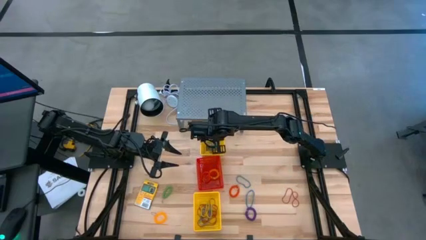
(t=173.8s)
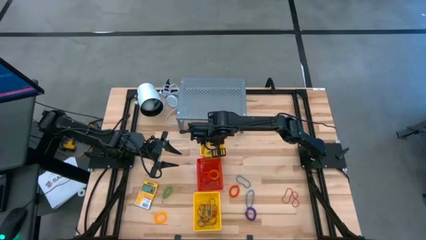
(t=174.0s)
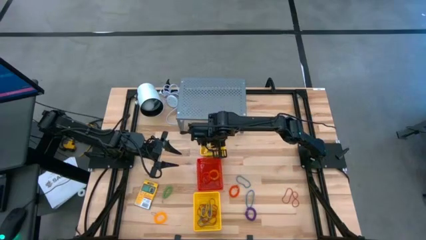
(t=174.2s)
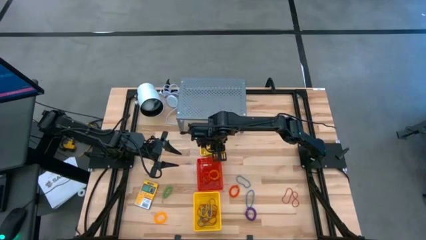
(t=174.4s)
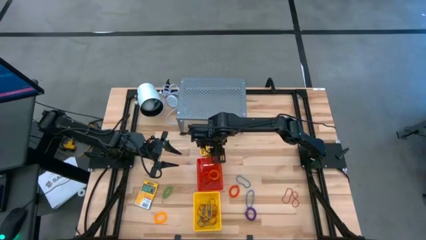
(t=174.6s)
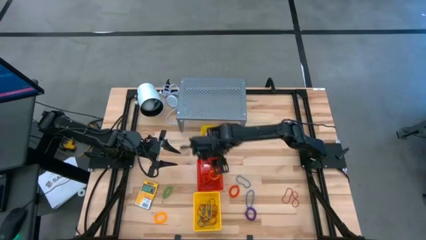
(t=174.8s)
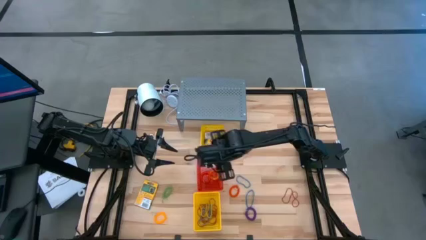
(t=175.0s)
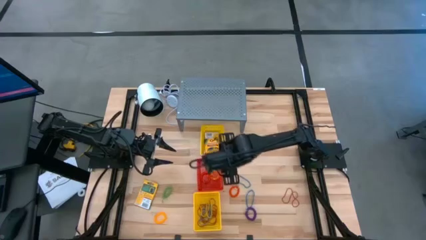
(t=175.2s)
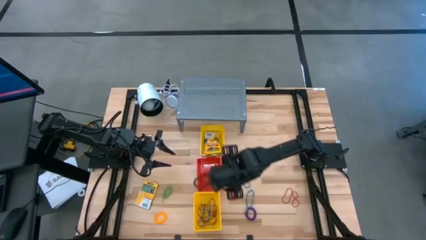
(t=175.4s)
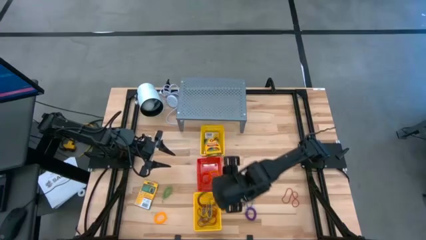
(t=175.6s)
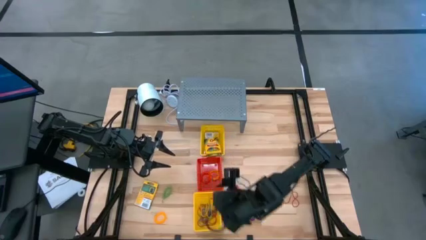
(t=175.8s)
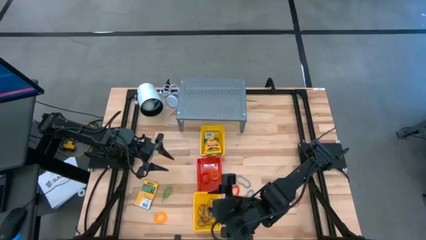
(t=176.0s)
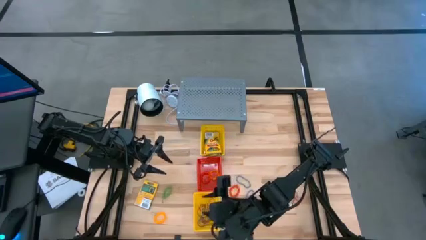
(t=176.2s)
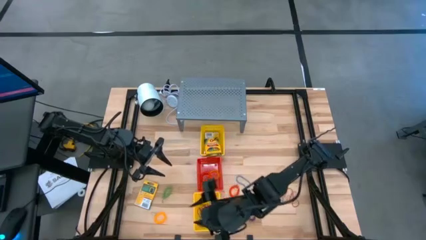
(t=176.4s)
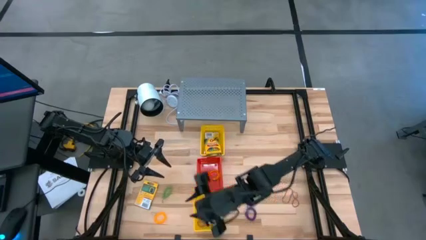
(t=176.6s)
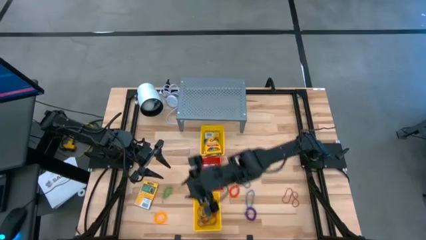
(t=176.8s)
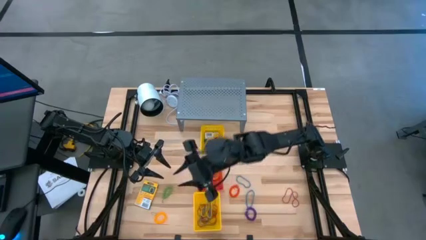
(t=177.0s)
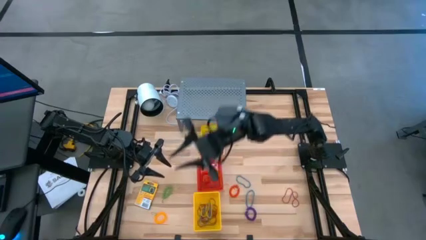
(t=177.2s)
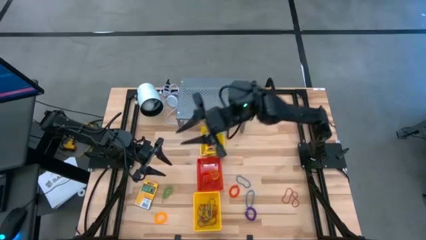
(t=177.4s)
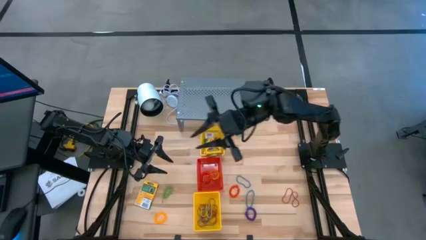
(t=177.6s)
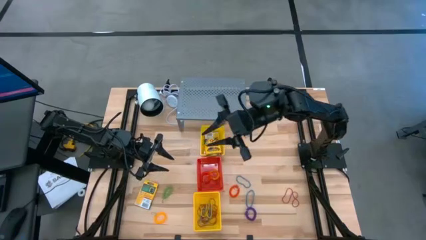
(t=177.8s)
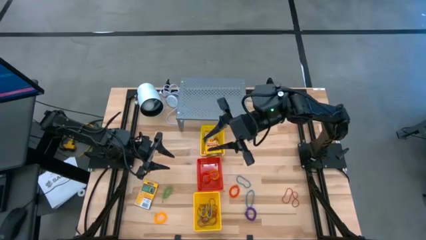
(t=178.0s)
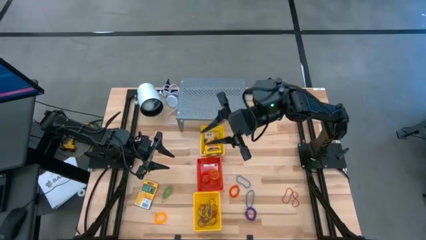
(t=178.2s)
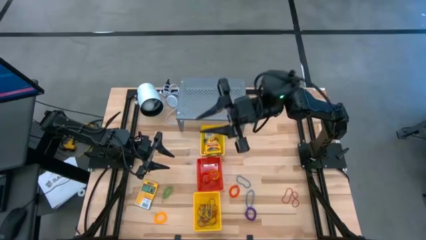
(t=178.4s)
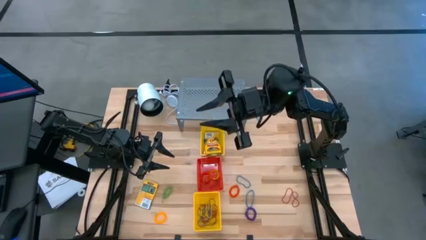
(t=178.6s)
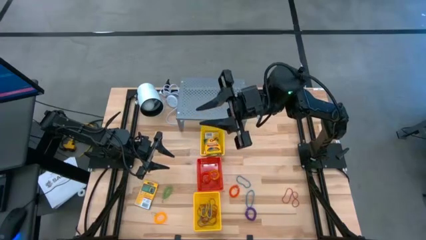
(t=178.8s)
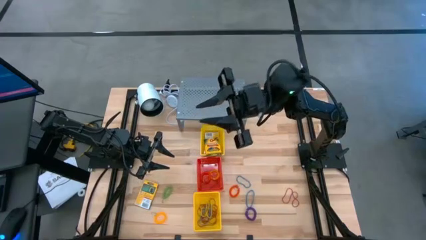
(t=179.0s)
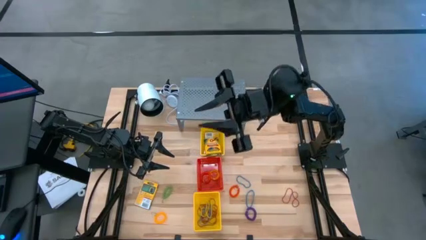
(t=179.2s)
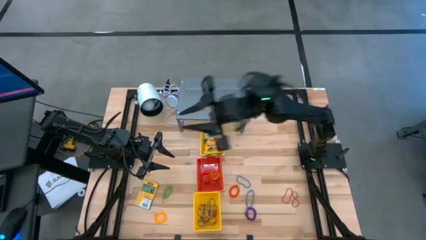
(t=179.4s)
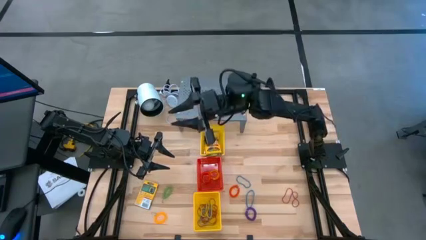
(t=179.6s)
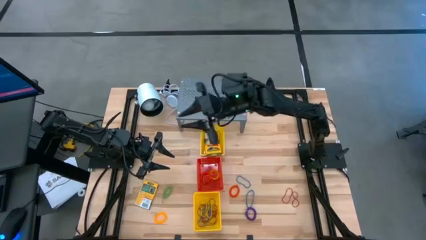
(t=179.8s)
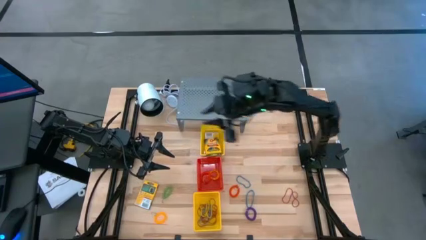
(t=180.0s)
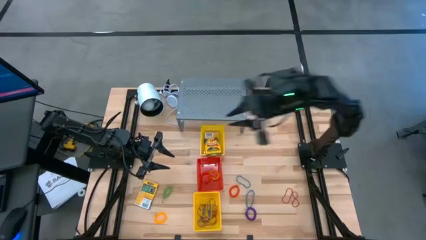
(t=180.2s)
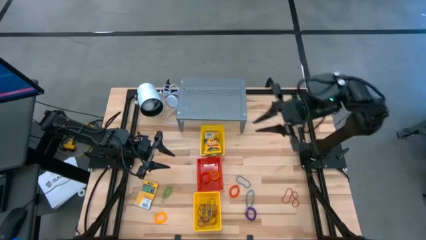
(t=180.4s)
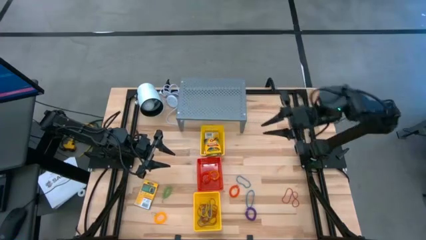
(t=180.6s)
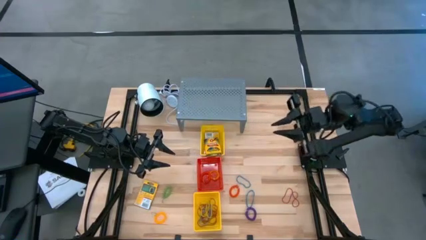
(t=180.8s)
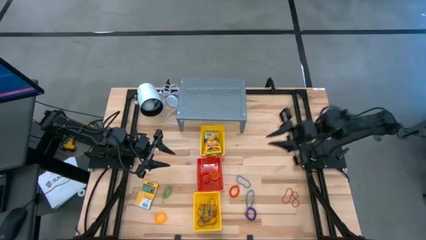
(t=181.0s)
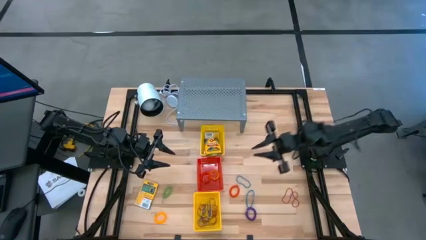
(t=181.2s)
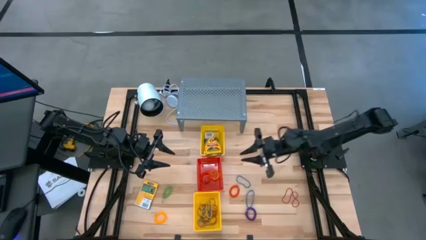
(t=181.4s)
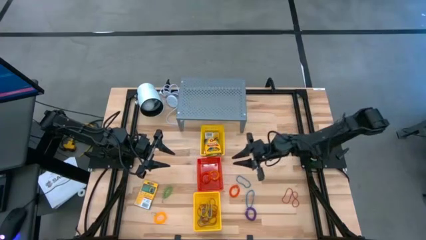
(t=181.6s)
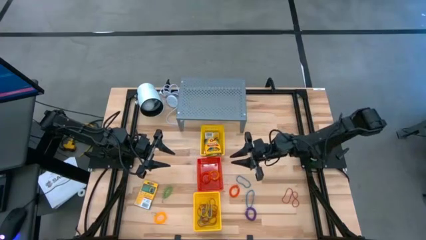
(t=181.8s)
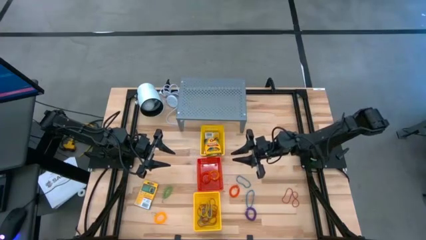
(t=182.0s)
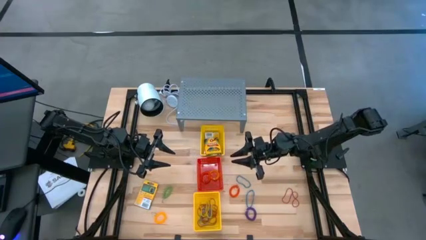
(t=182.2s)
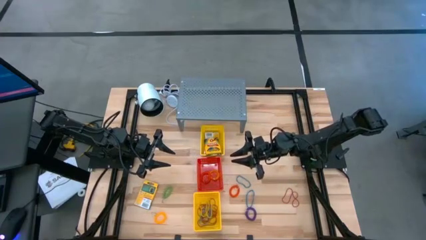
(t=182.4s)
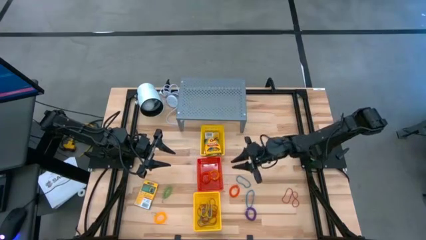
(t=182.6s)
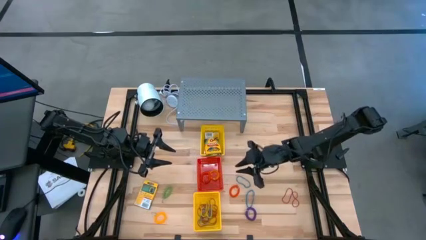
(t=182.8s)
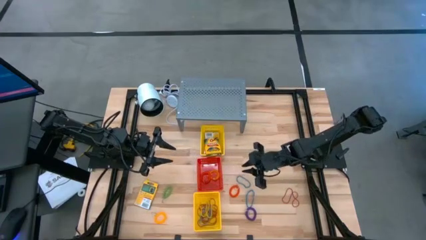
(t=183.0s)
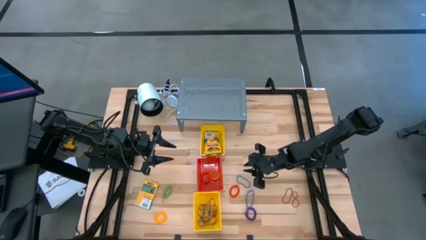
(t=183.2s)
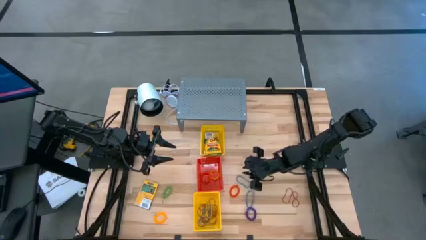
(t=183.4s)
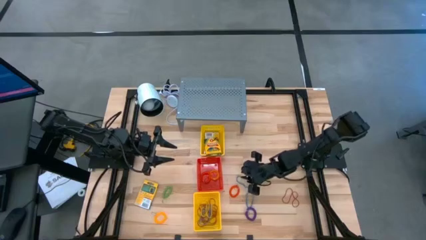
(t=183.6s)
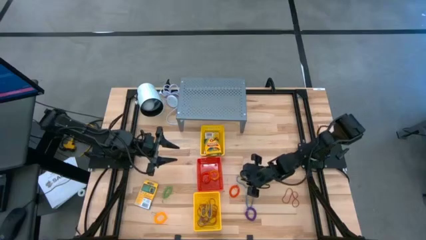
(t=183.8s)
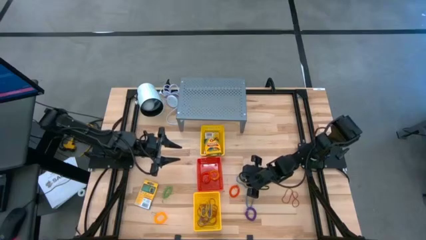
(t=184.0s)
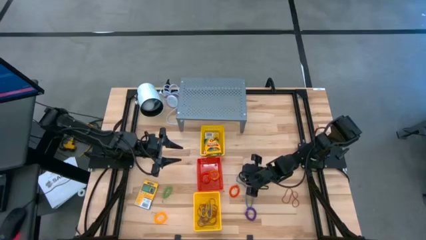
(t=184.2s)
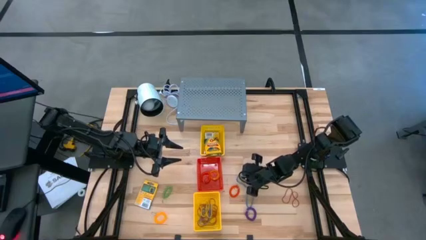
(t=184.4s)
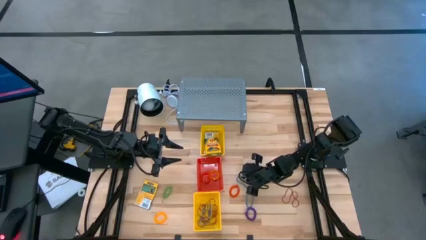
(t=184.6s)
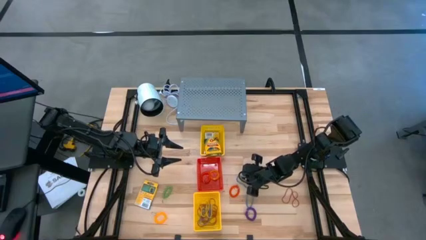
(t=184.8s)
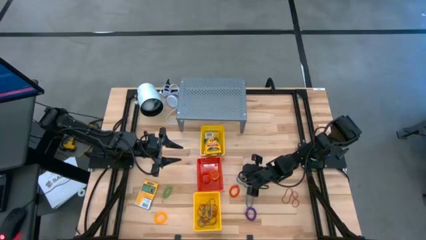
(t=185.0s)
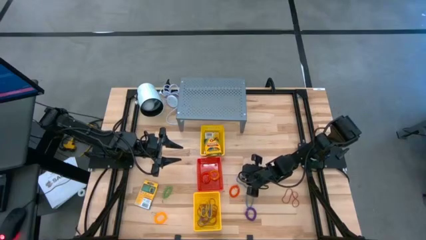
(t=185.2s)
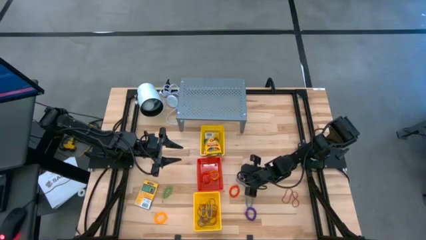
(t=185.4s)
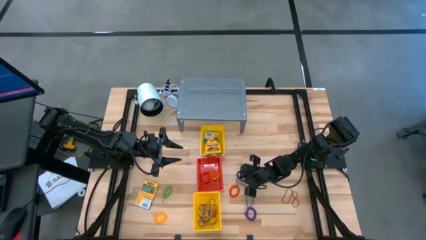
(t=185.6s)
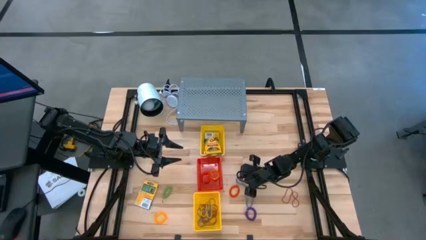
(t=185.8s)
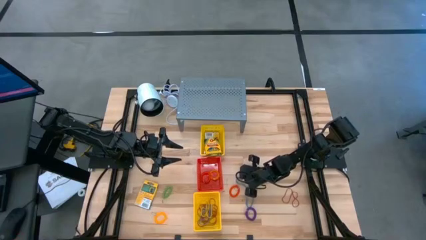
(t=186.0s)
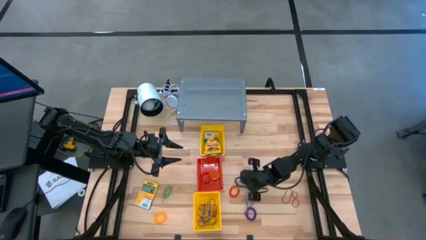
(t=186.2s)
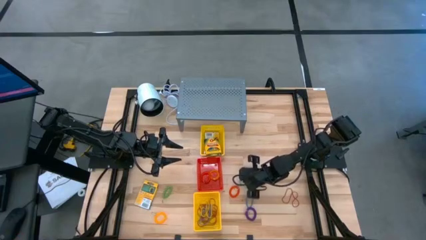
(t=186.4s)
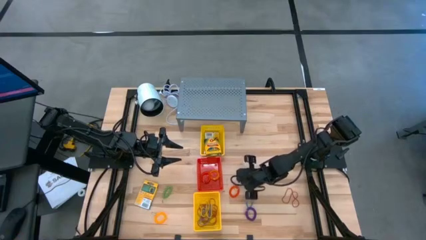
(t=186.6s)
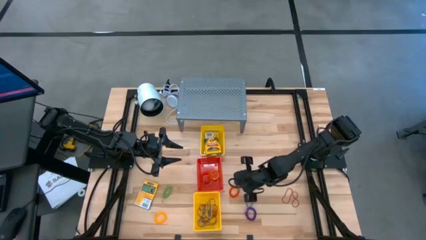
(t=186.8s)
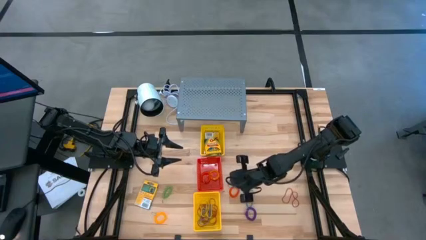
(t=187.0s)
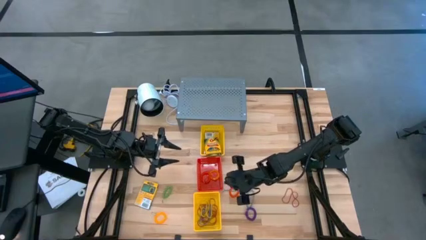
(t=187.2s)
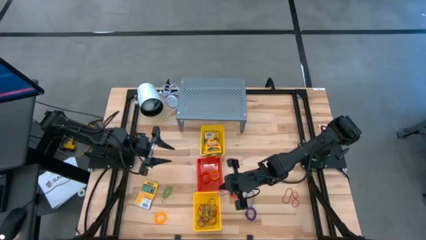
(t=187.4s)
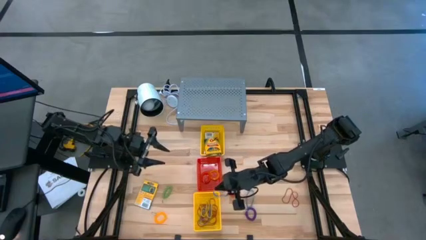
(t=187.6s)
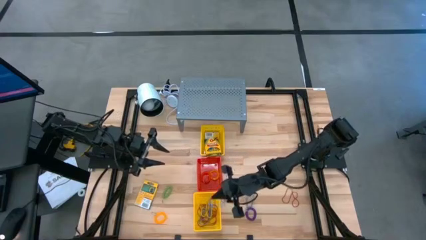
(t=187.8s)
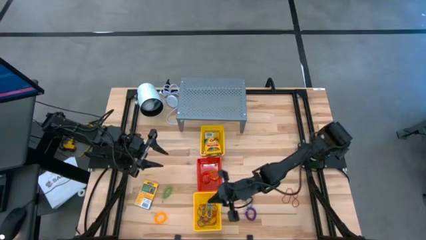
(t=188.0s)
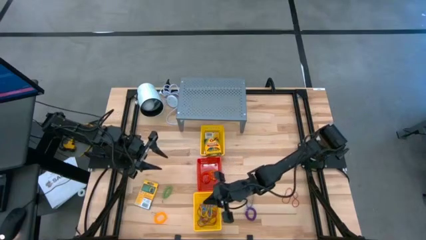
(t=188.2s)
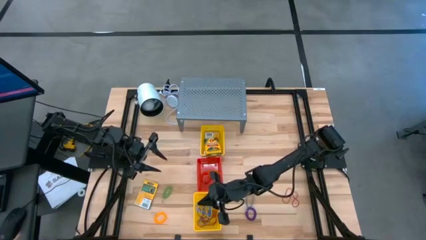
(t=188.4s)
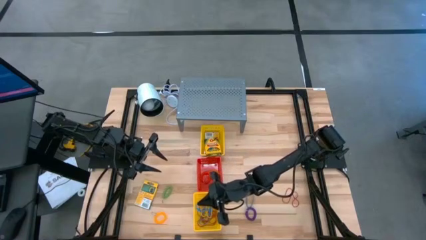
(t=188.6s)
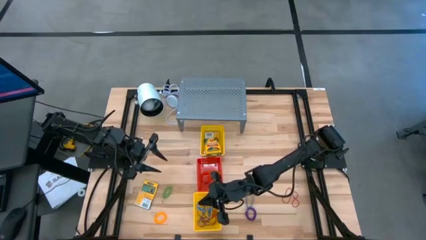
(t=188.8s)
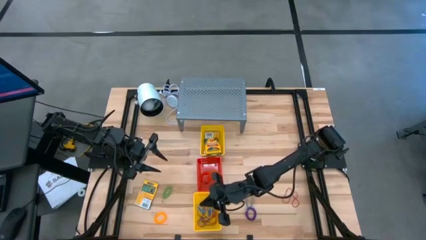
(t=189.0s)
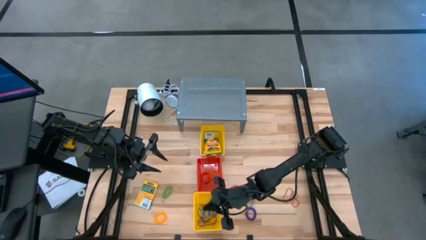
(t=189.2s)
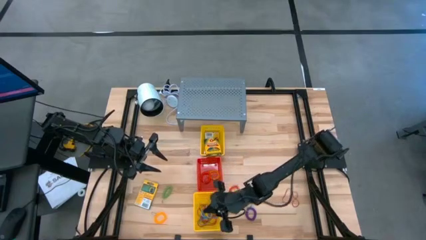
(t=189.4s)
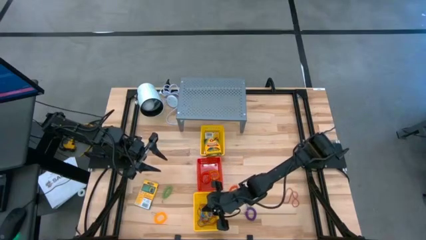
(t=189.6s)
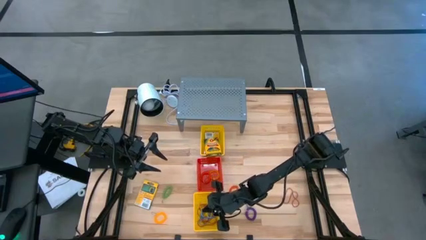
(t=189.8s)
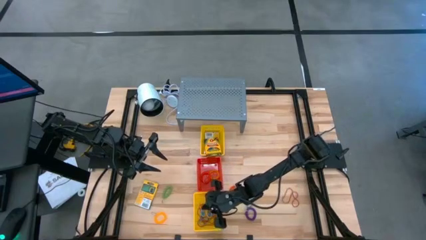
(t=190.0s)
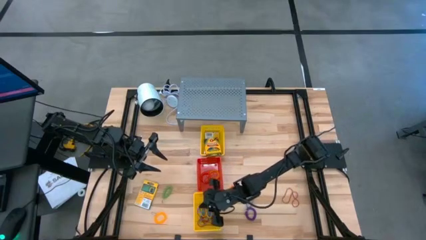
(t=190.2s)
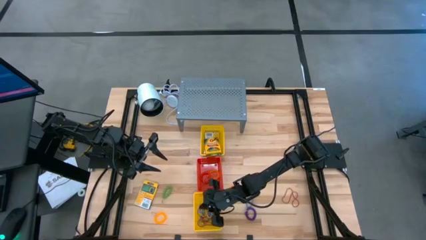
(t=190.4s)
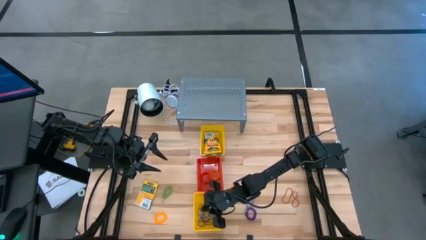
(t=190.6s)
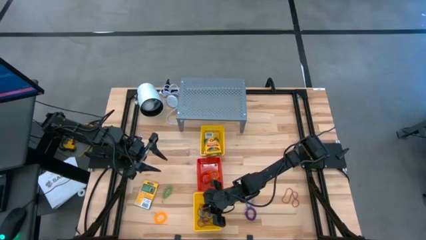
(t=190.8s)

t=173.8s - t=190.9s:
Task: Pick & Place Office Desk Supplies
Put the blue rubber band into the bottom yellow bin
